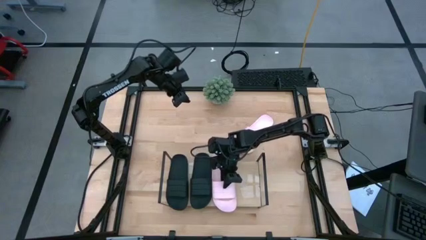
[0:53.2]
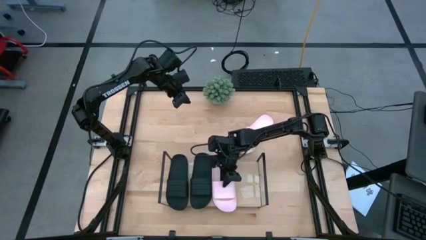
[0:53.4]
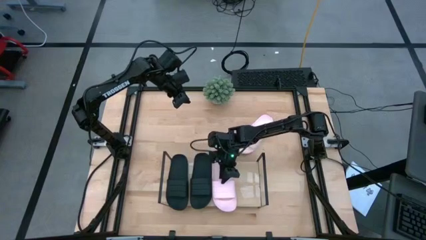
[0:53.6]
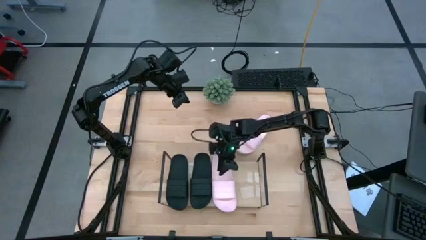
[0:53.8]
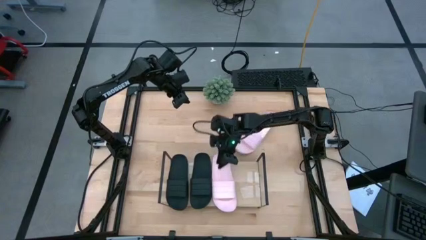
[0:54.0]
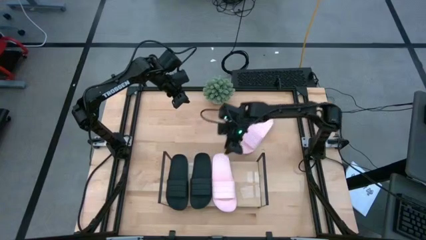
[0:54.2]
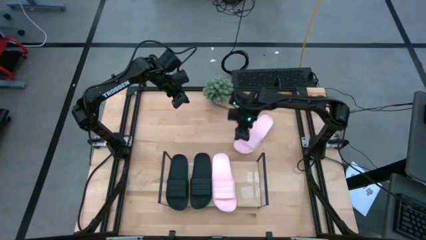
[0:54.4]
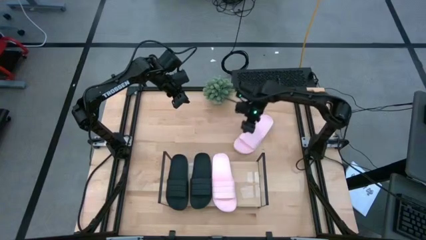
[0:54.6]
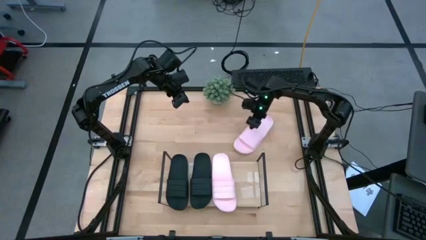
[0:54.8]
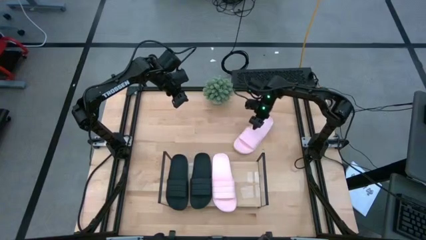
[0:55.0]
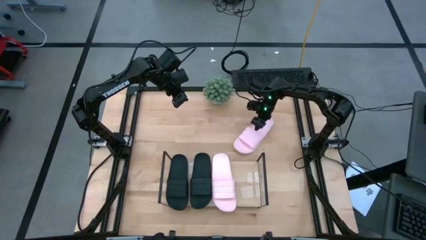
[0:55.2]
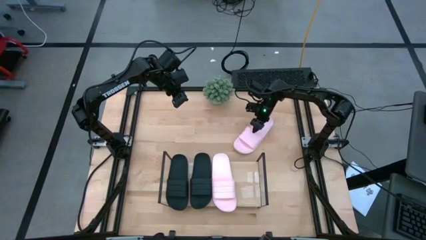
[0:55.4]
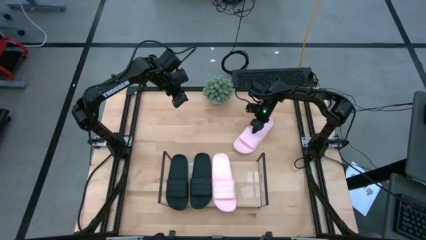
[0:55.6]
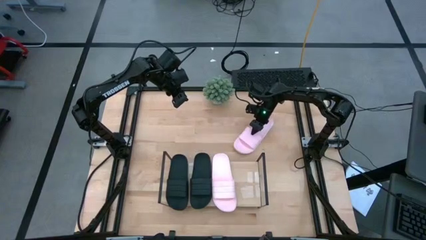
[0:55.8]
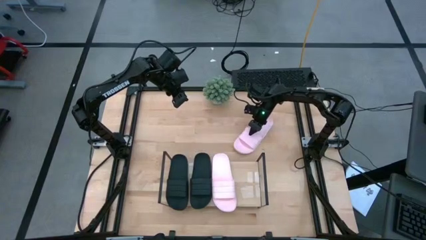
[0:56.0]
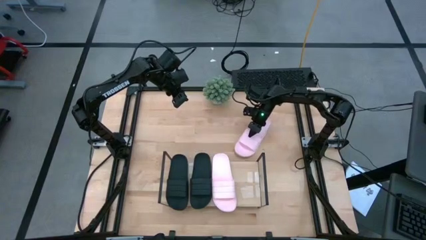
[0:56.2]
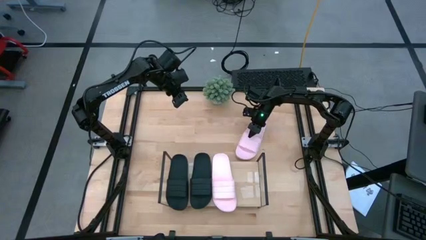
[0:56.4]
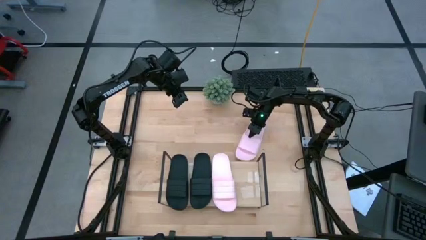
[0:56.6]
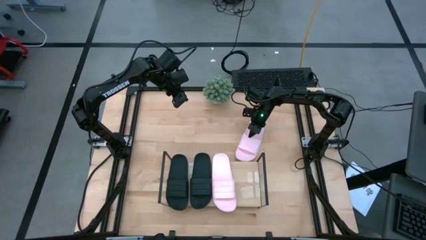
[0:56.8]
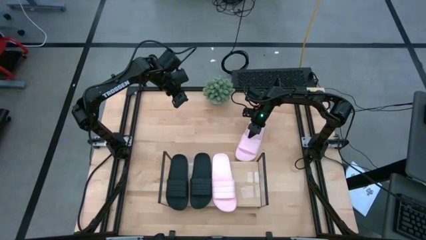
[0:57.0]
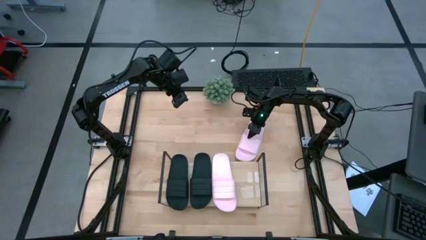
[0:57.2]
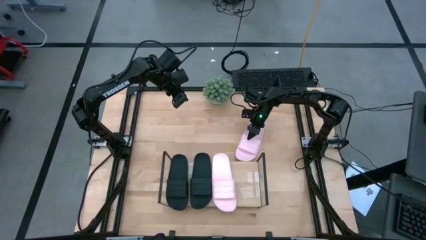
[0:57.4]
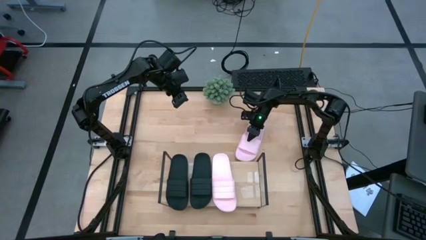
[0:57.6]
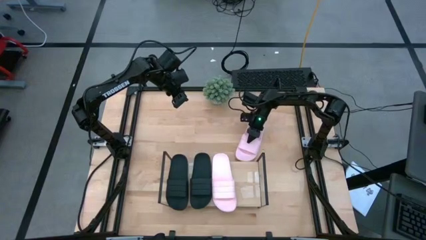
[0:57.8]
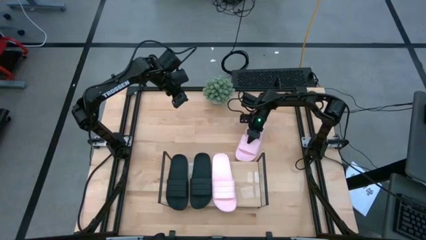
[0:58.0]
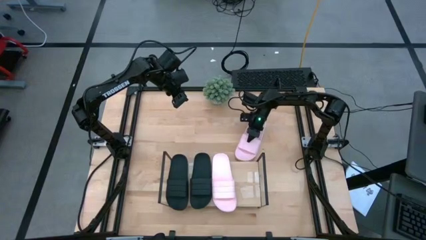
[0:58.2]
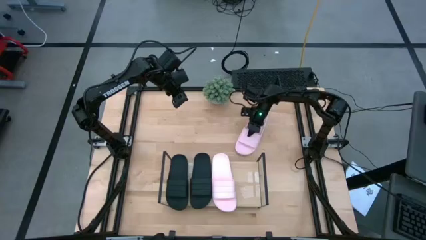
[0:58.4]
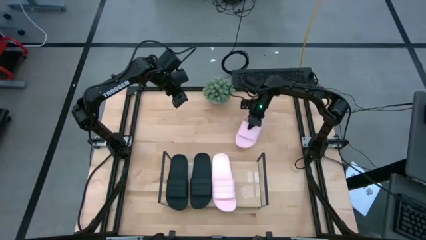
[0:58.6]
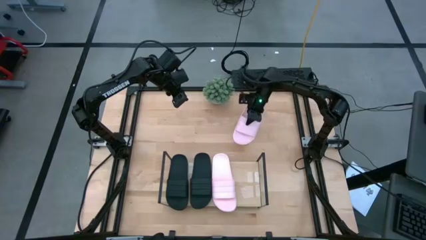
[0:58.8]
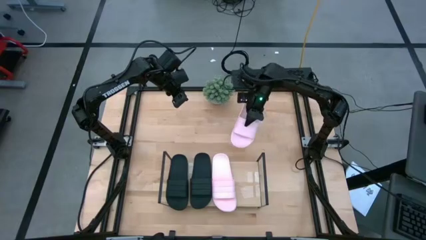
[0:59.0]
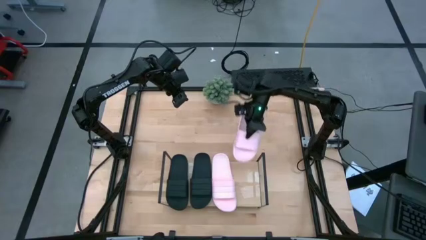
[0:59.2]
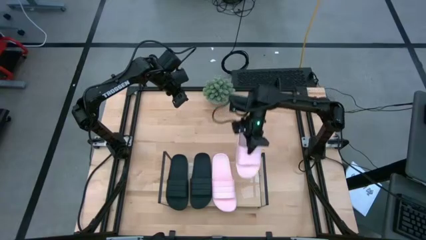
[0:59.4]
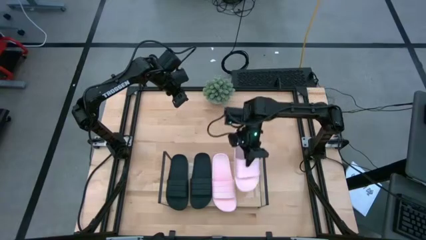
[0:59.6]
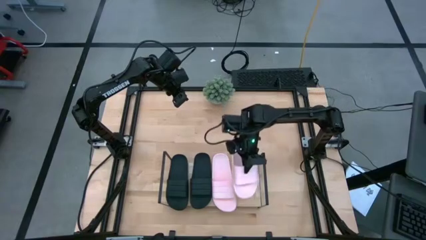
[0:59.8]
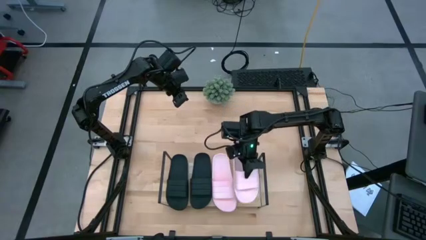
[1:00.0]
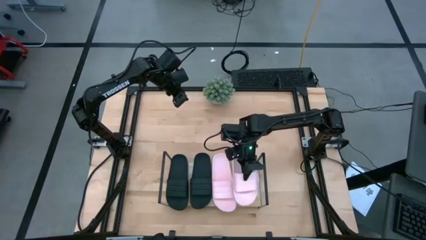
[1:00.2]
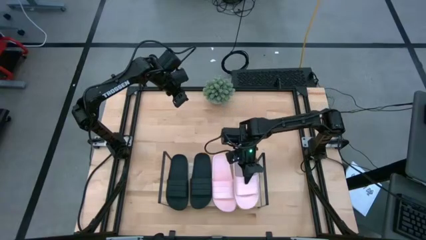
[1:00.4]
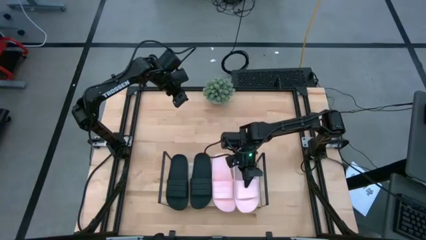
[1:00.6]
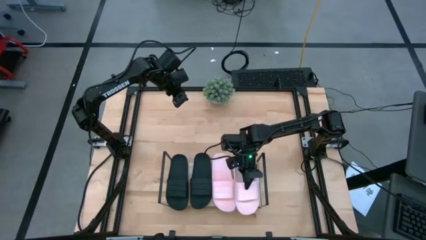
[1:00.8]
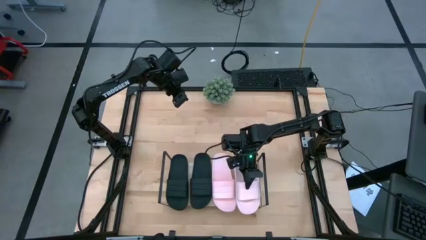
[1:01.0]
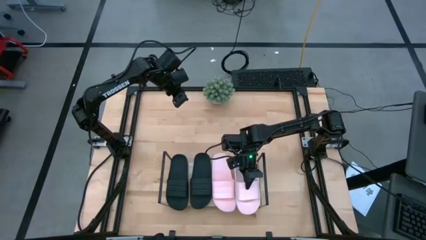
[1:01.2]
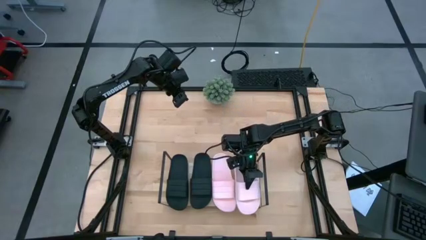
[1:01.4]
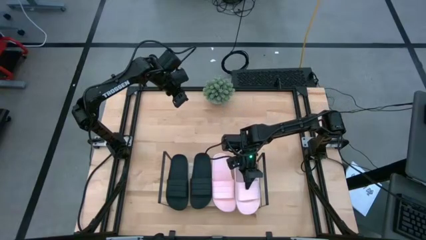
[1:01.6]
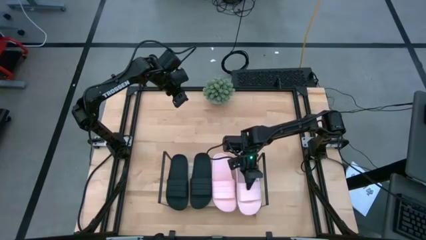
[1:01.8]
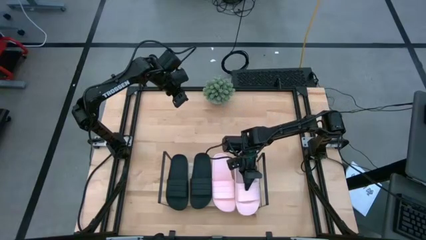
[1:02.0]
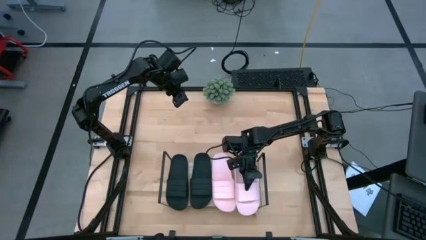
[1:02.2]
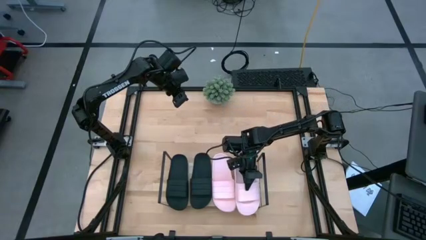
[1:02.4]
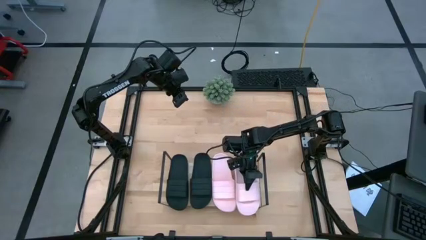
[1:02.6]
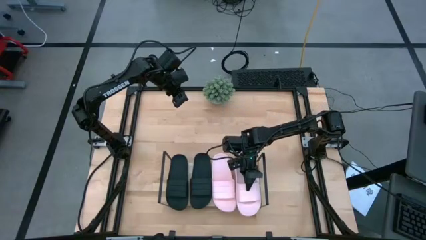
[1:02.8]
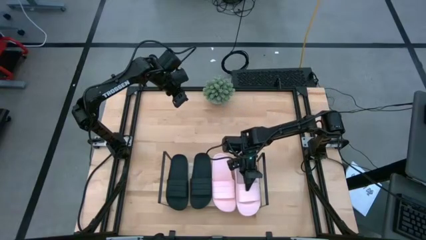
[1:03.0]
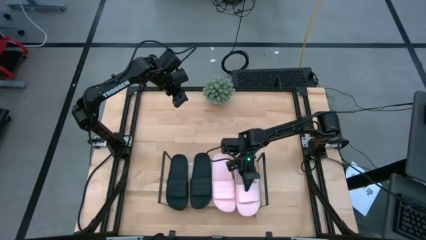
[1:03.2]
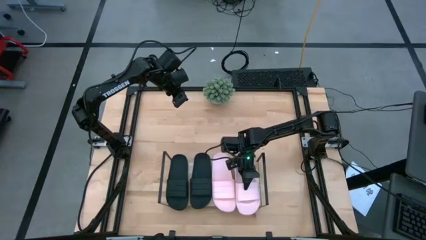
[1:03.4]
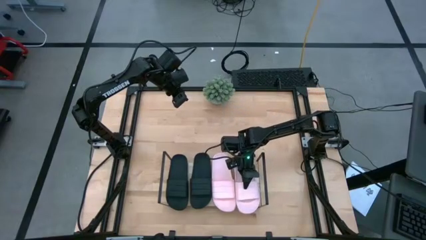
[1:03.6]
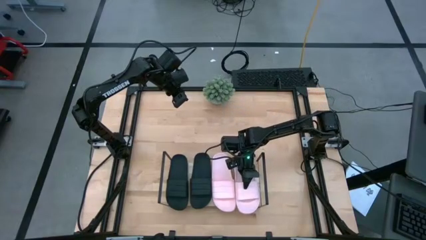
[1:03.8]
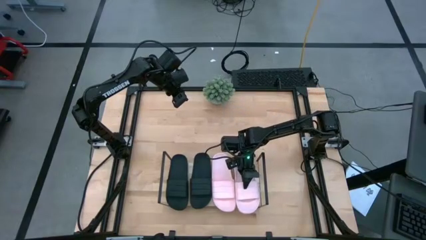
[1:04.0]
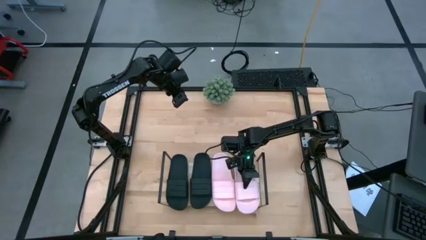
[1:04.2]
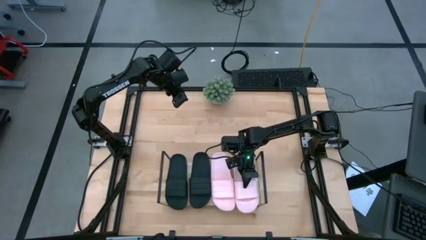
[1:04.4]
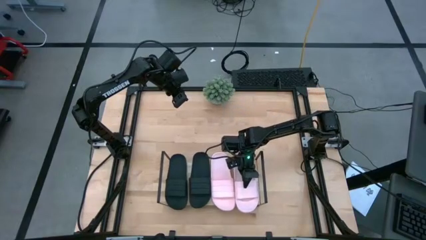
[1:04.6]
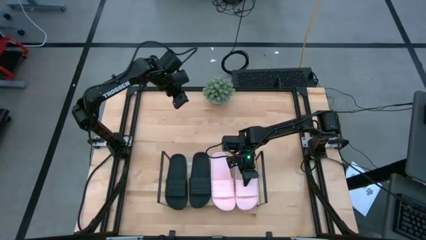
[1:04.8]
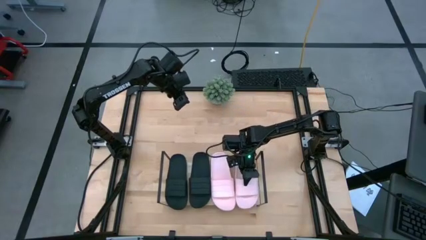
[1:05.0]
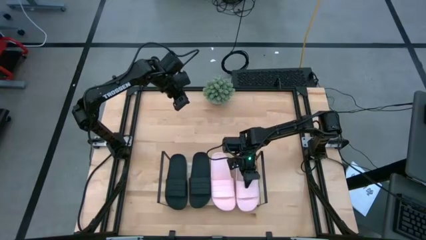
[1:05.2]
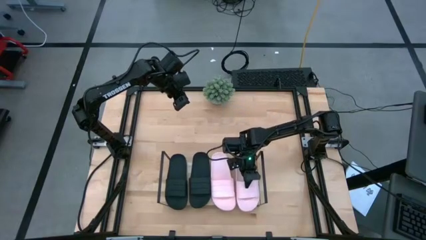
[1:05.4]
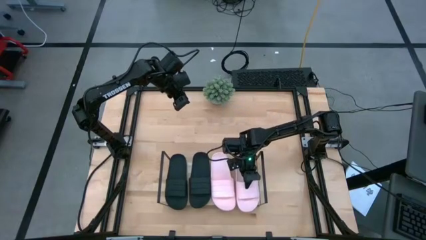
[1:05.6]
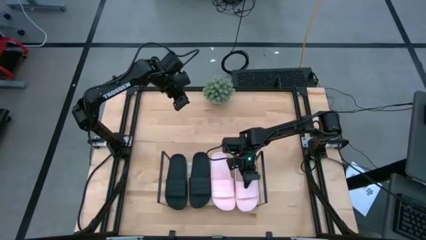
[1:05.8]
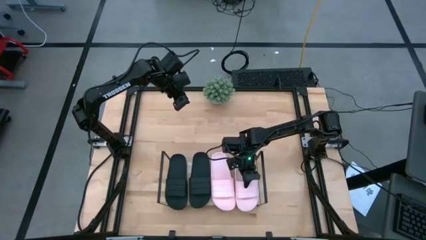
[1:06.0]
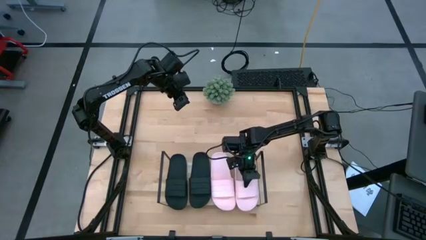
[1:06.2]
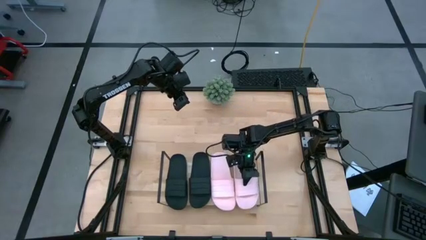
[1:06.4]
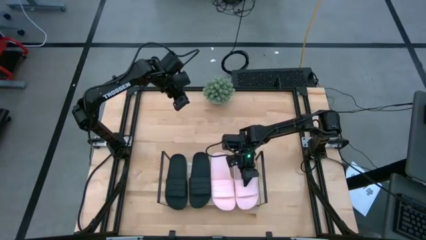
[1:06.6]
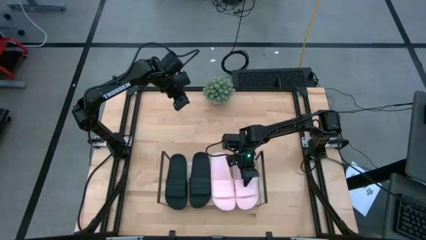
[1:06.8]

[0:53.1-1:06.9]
Task: Pick and place slides into the shelf
Put the left pink slipper on the shelf
